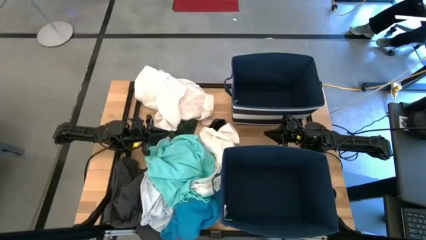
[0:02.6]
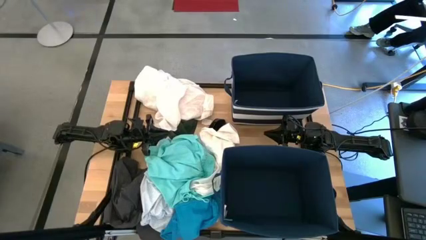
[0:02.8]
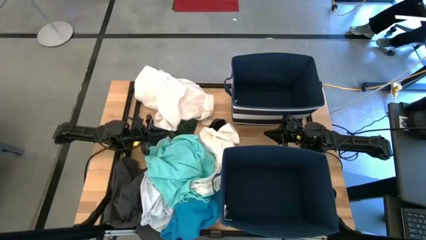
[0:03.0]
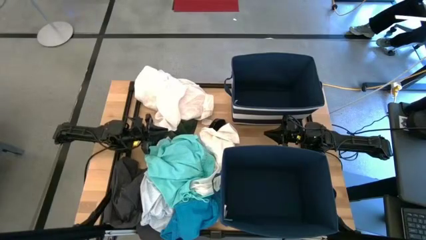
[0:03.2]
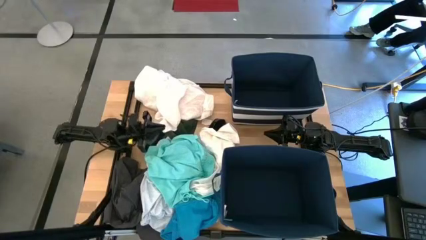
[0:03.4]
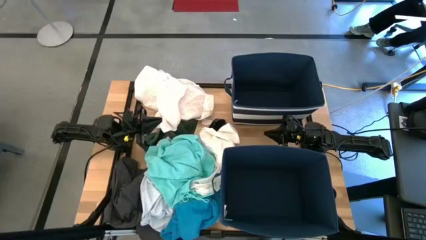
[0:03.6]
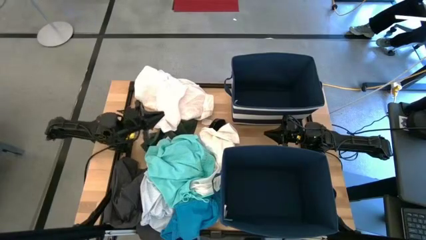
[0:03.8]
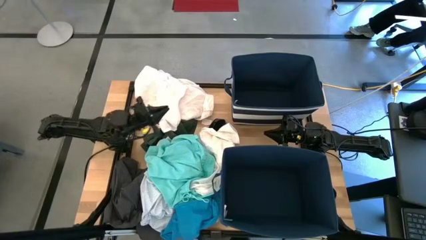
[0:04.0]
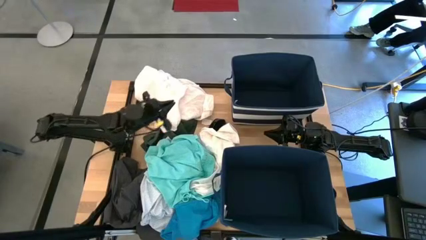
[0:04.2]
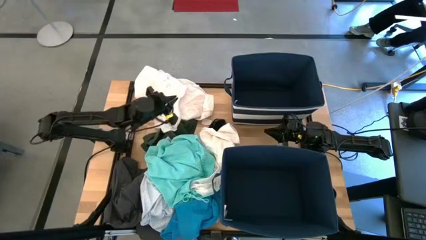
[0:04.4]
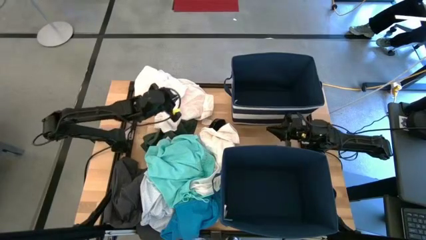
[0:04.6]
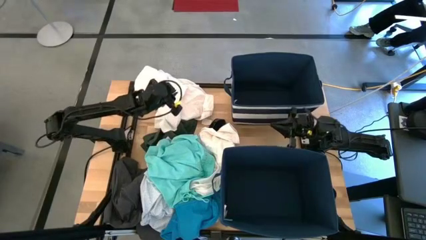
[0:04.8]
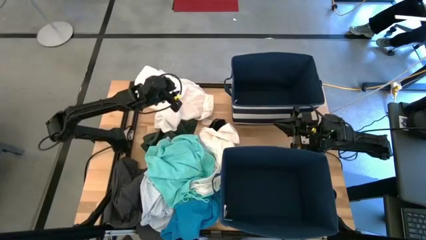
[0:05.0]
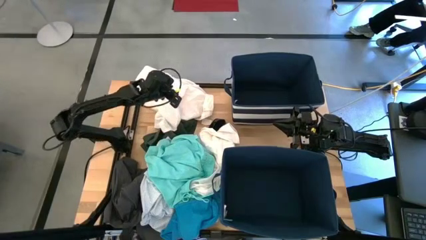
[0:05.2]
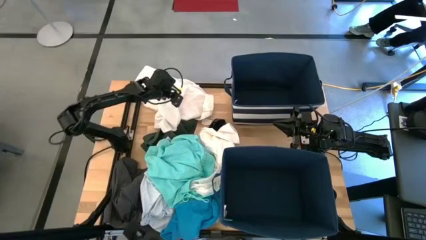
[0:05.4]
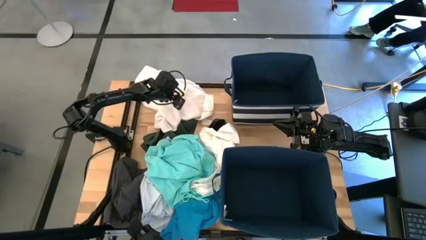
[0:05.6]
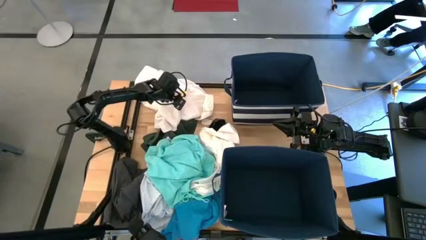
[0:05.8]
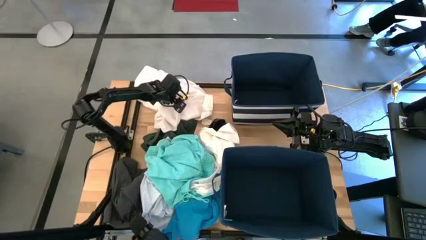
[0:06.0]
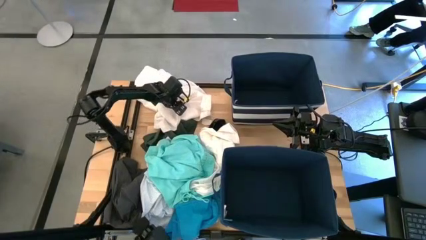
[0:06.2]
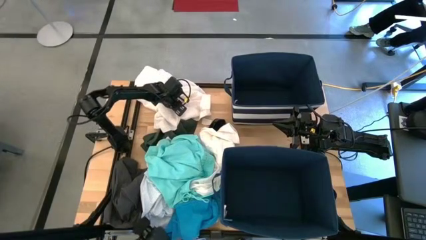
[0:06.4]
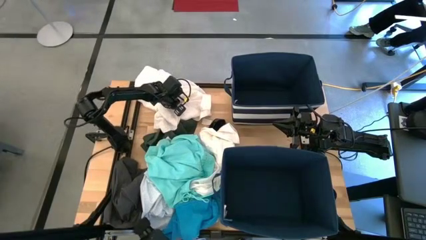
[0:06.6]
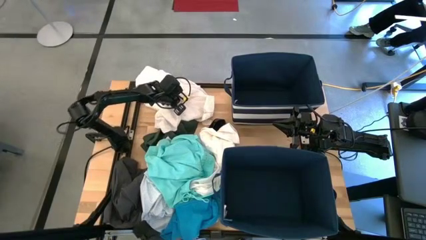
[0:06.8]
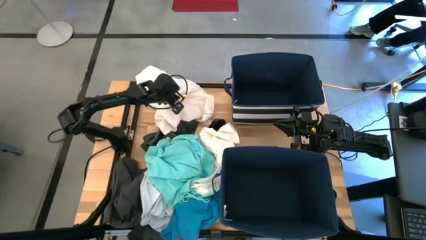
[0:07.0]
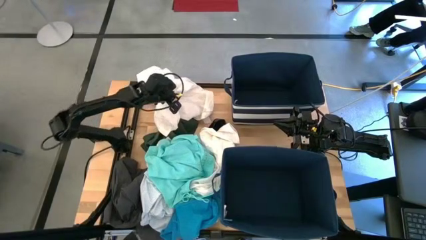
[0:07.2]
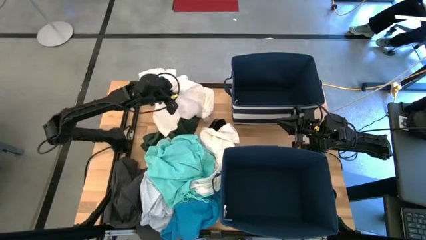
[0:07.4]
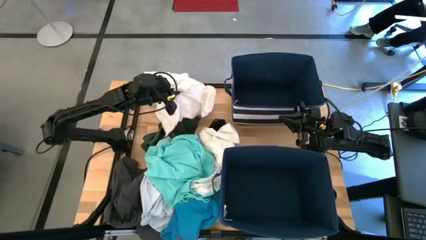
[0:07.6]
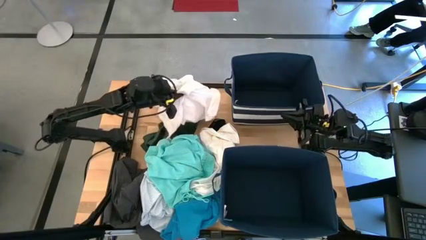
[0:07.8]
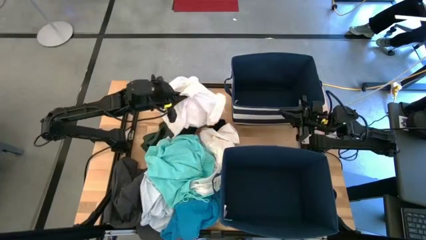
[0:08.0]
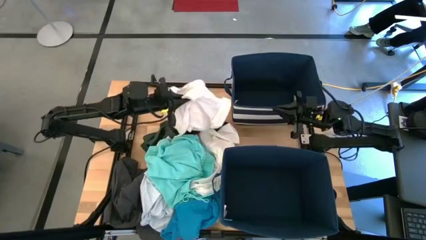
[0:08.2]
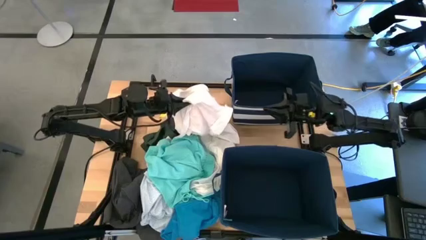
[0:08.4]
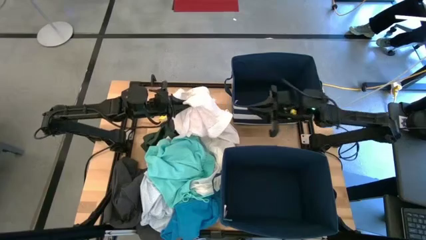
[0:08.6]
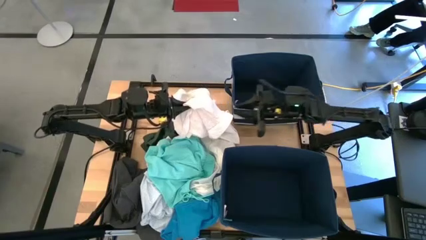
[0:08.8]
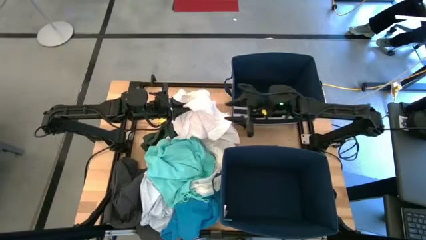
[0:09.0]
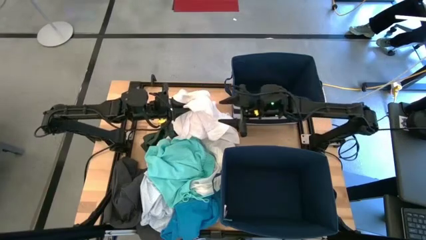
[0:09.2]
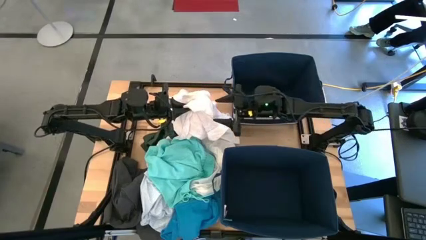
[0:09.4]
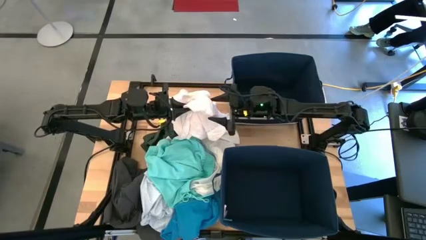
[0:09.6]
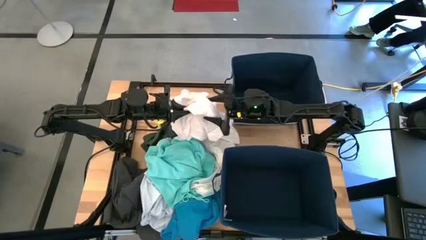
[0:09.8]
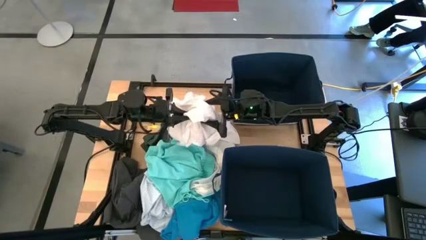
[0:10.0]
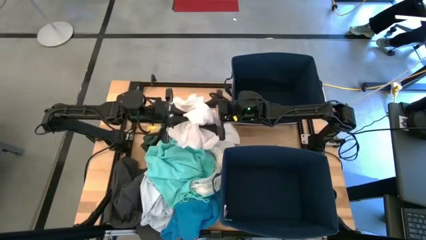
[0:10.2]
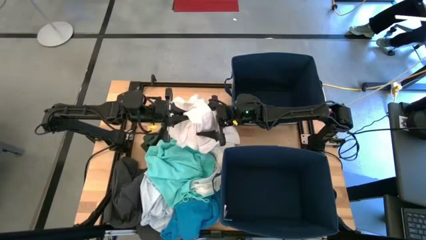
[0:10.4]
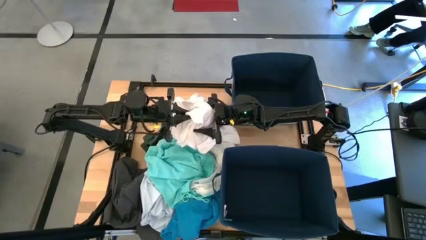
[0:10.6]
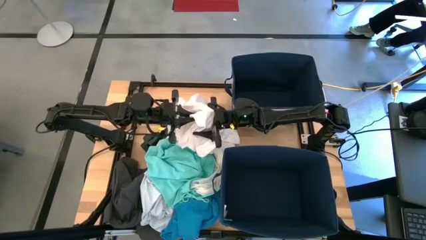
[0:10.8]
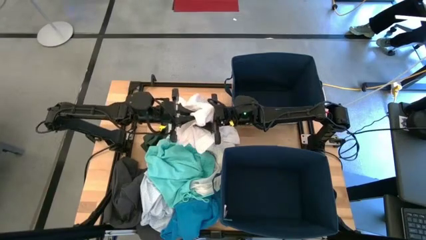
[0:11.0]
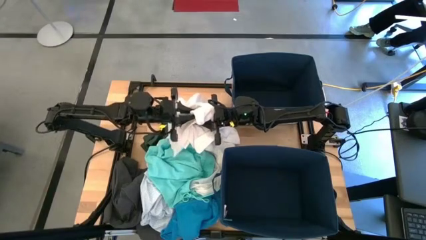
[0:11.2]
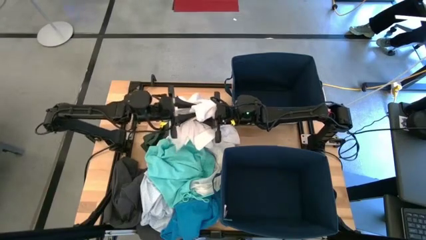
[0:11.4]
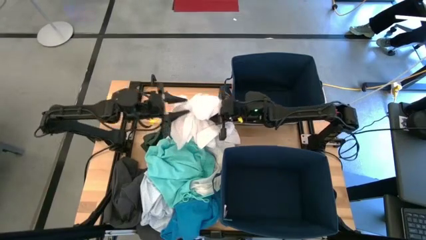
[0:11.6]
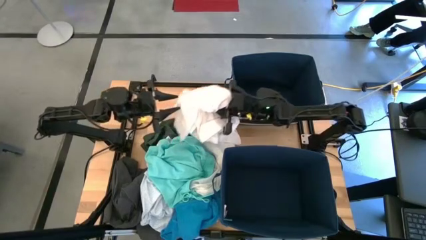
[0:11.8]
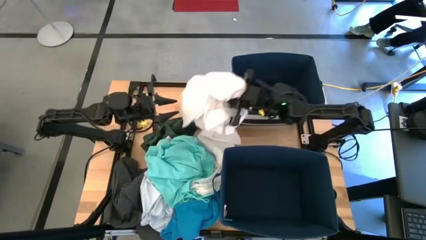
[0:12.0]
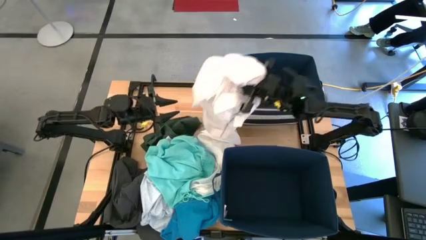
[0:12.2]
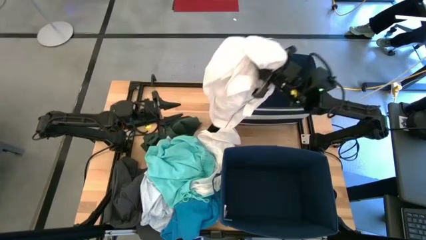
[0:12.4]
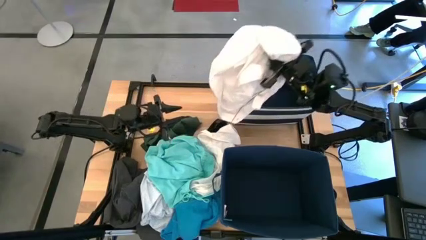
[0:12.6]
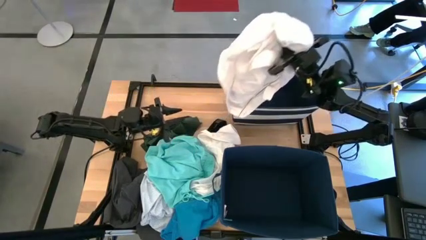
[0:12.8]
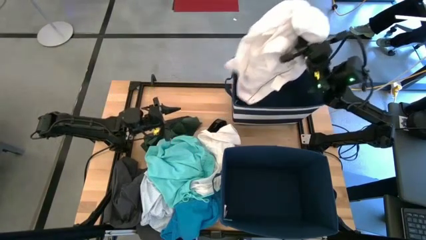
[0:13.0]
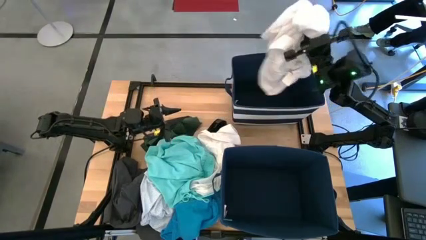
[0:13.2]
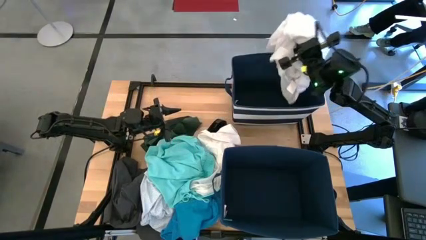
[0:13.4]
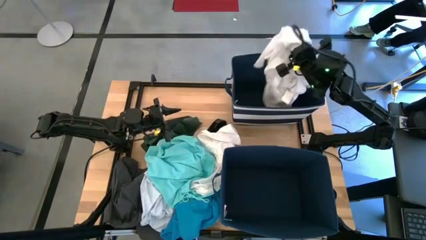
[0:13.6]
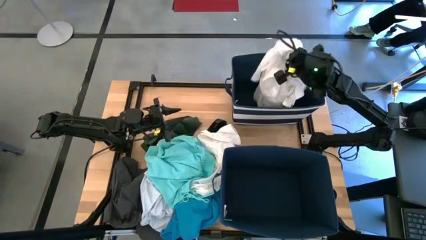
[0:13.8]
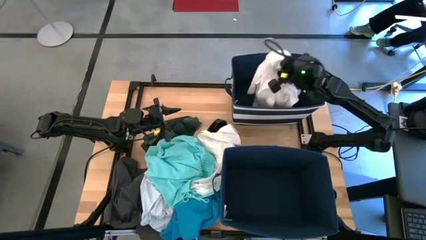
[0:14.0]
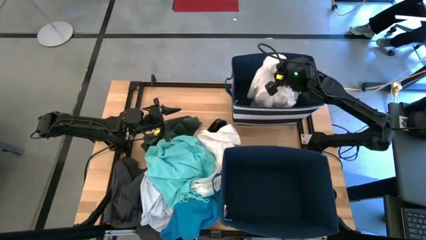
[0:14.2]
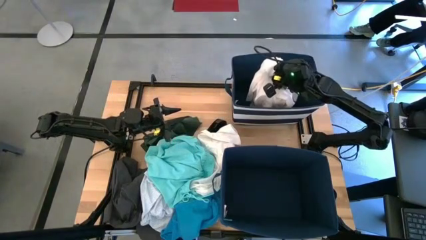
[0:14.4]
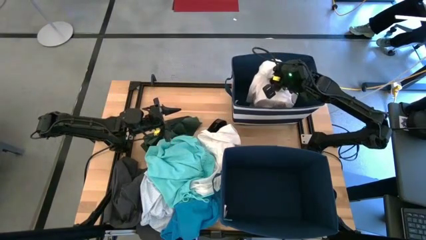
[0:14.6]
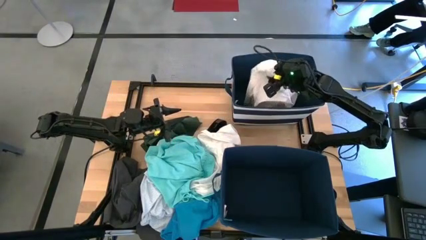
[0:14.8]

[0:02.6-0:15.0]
Task: Sort clothes
Put the white polo shirt into the top blue bin

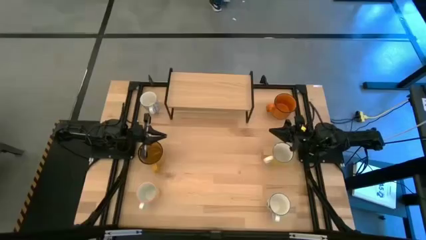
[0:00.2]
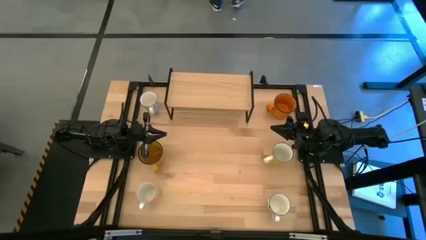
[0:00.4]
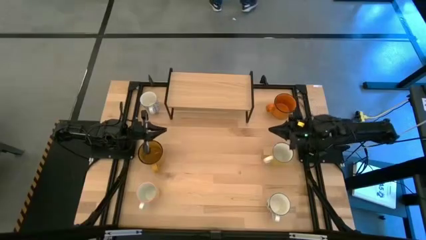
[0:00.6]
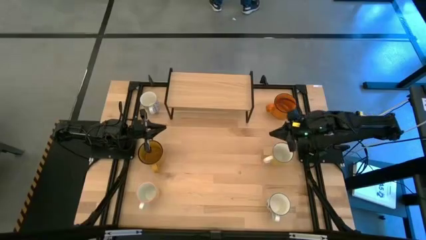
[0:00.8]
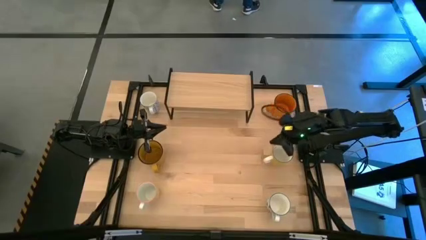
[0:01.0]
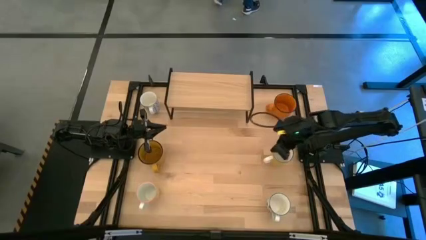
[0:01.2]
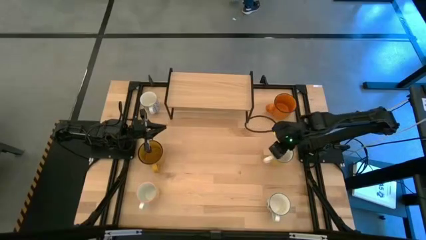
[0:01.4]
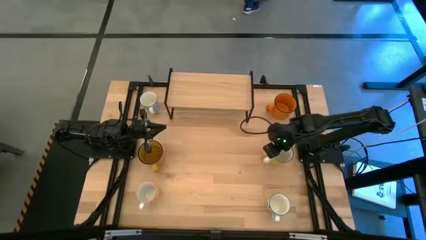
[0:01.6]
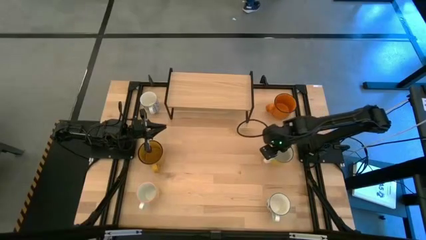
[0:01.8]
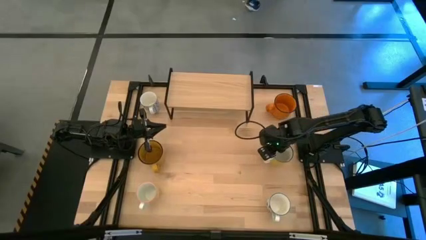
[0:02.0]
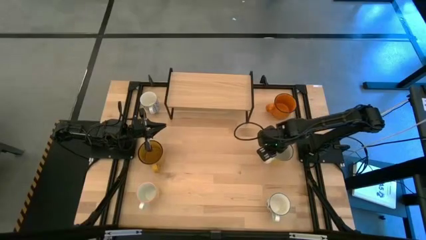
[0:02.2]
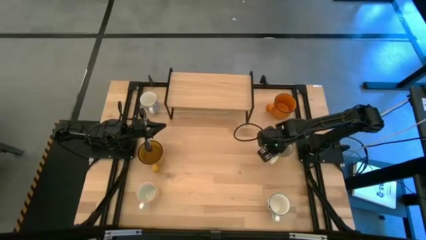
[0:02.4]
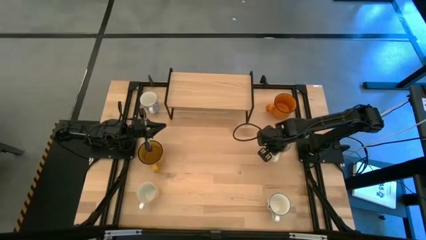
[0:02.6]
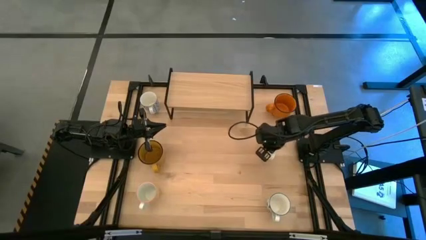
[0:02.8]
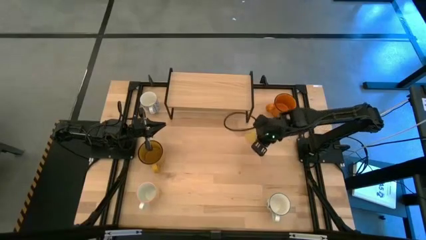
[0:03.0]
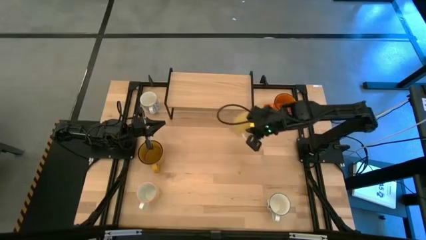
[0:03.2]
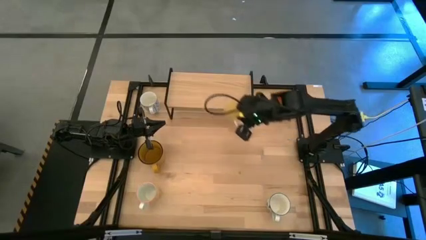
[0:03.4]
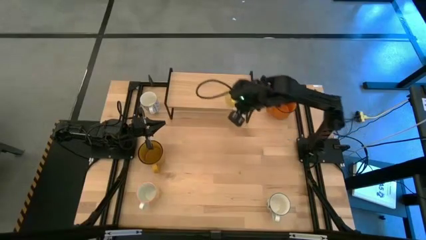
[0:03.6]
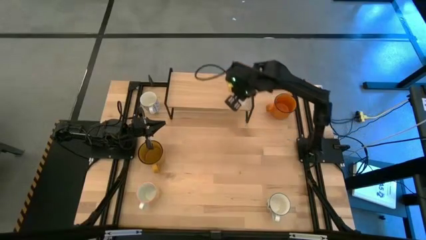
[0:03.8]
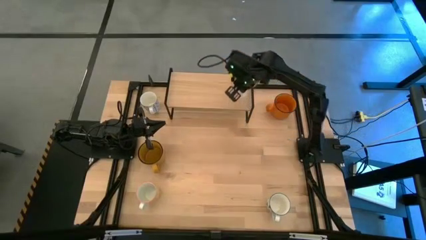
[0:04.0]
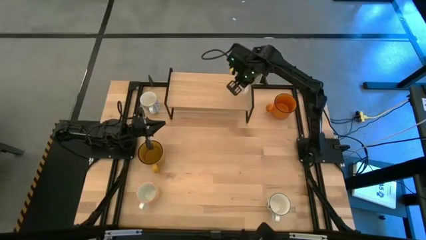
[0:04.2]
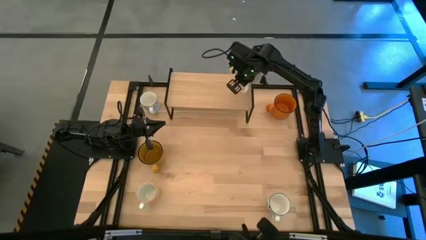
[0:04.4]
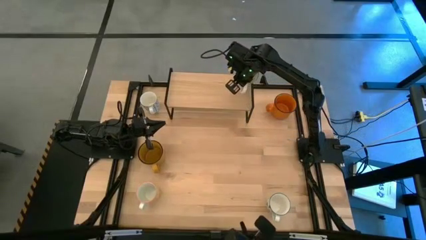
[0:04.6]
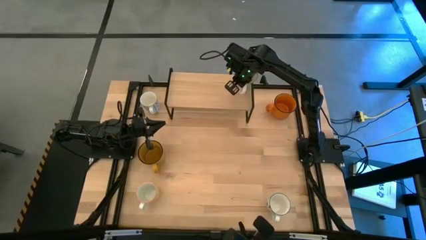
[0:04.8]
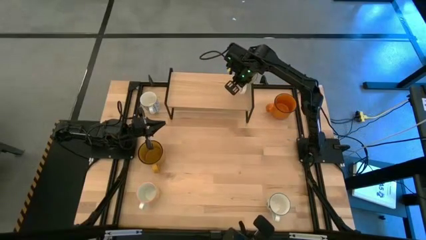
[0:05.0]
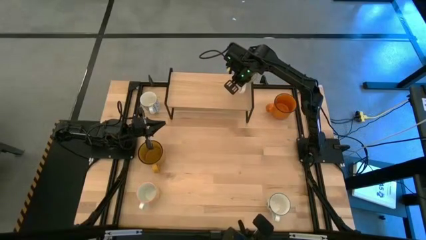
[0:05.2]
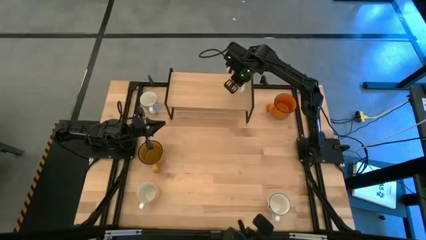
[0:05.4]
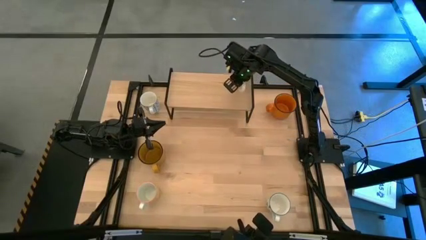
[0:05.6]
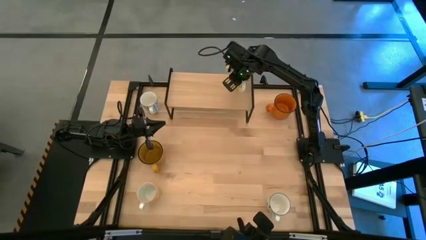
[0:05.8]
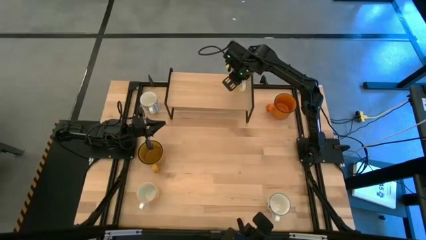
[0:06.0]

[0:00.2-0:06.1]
Task: Place coffee mugs
Put the light yellow mug on the shelf
